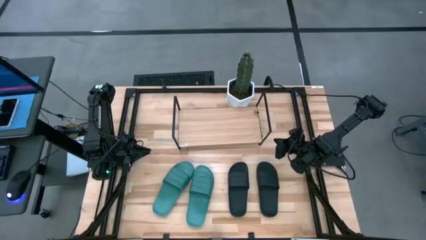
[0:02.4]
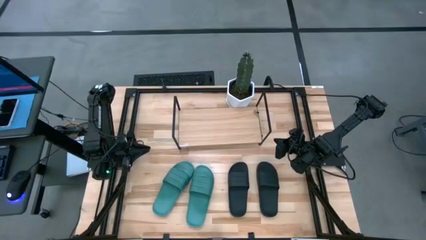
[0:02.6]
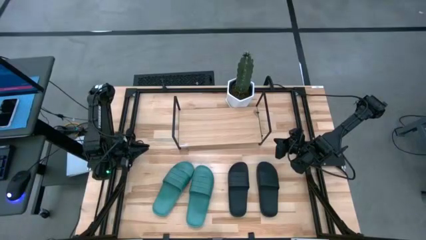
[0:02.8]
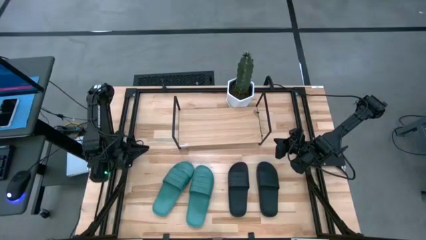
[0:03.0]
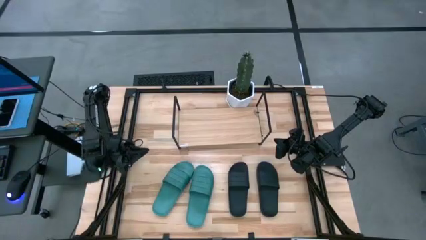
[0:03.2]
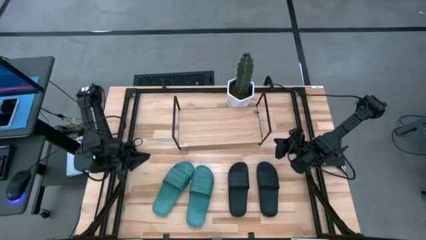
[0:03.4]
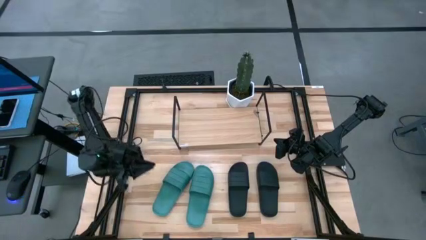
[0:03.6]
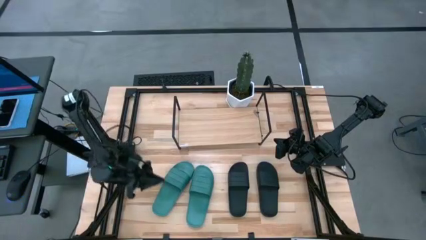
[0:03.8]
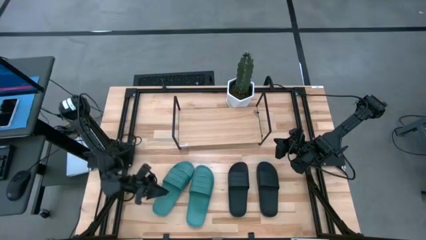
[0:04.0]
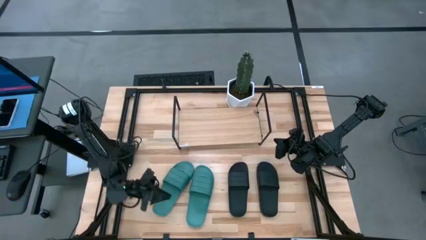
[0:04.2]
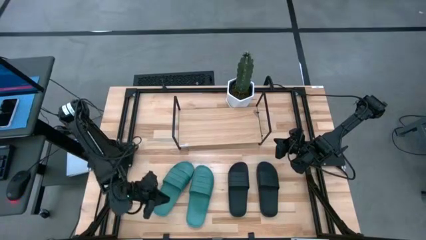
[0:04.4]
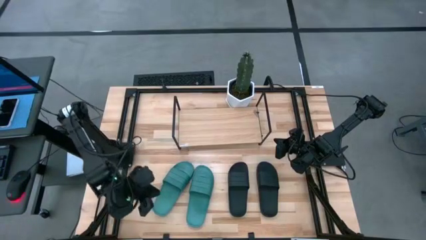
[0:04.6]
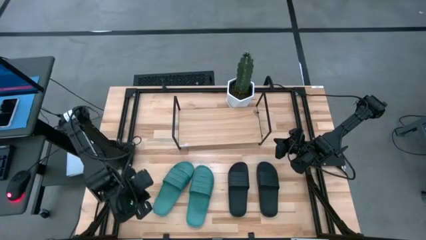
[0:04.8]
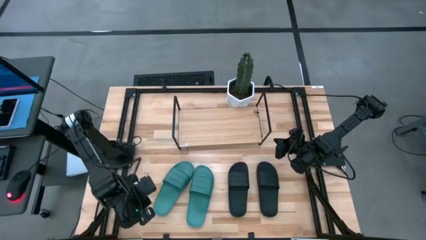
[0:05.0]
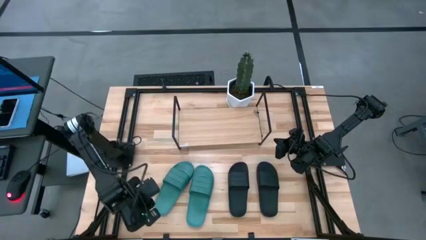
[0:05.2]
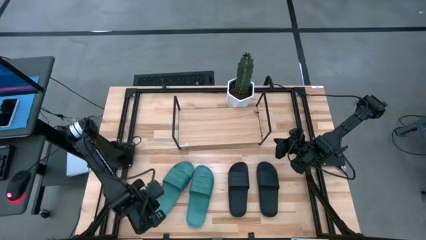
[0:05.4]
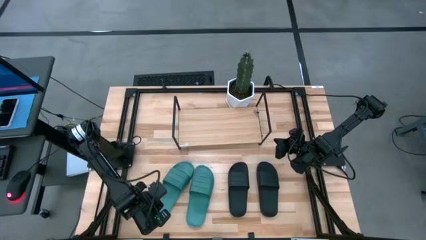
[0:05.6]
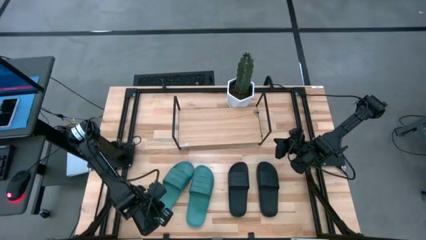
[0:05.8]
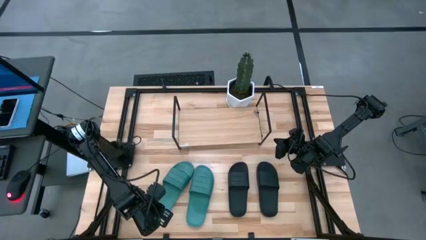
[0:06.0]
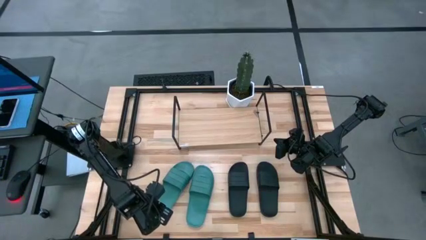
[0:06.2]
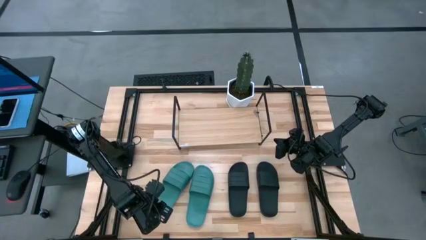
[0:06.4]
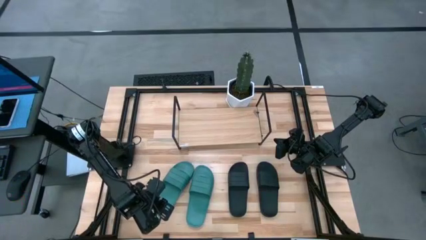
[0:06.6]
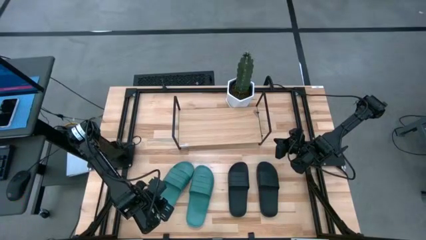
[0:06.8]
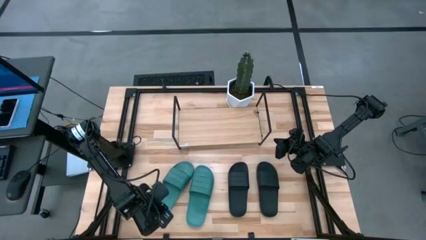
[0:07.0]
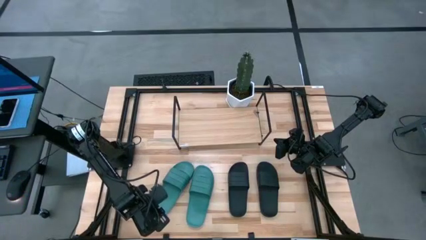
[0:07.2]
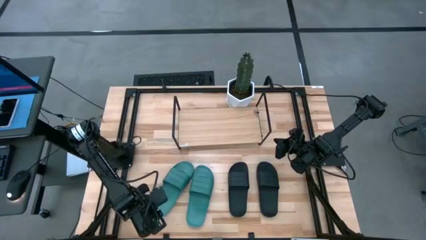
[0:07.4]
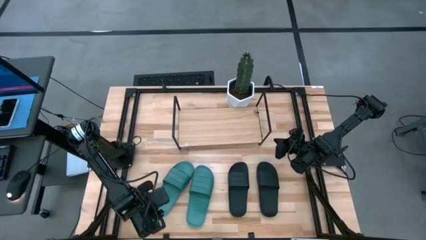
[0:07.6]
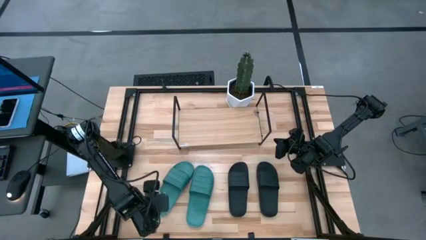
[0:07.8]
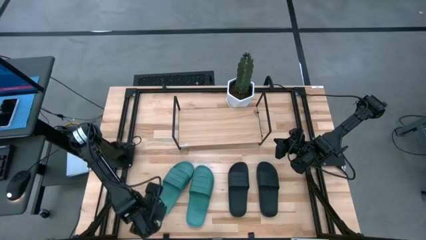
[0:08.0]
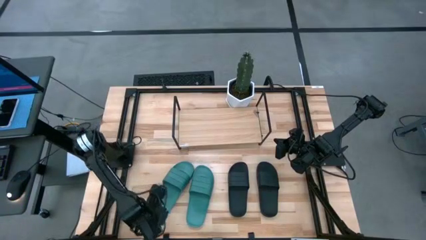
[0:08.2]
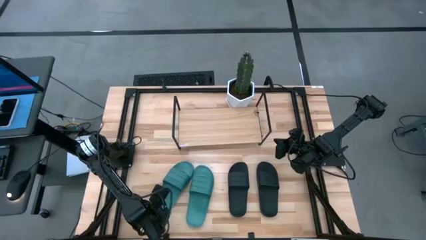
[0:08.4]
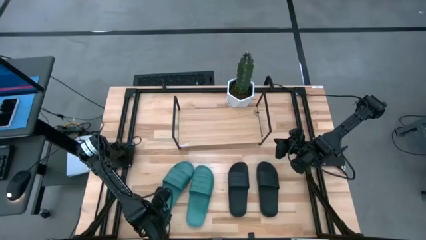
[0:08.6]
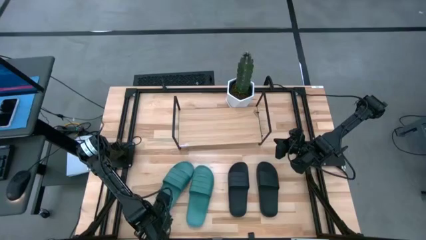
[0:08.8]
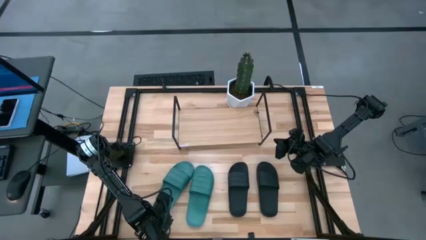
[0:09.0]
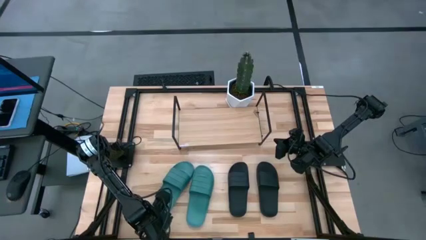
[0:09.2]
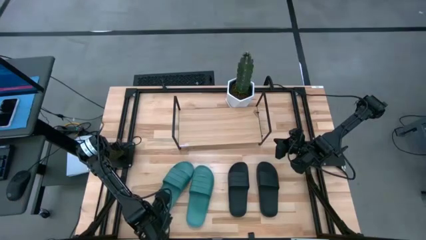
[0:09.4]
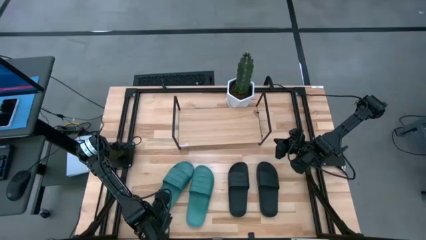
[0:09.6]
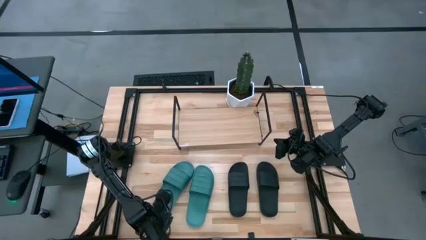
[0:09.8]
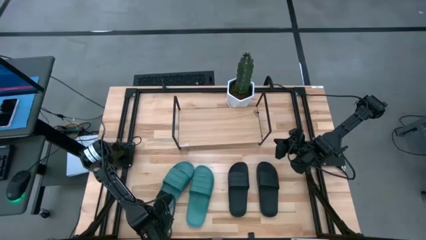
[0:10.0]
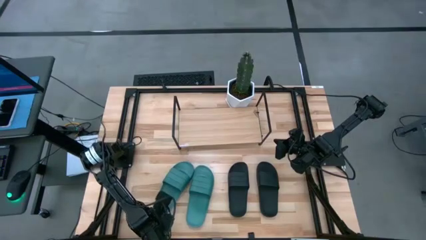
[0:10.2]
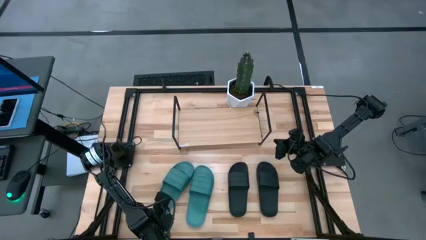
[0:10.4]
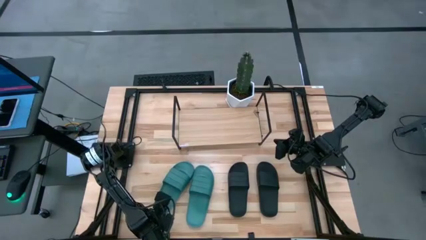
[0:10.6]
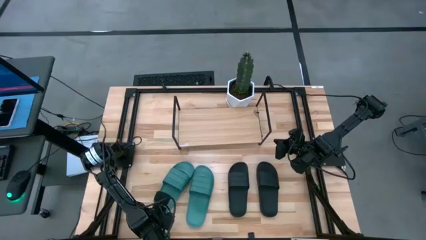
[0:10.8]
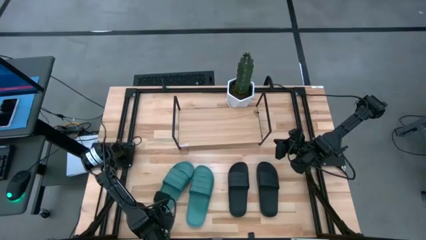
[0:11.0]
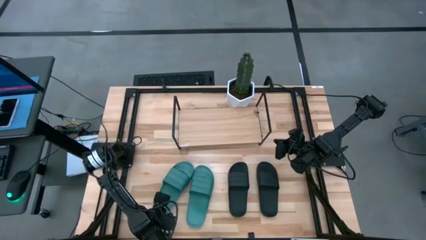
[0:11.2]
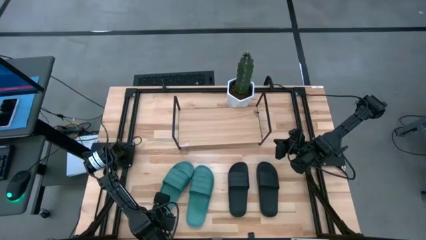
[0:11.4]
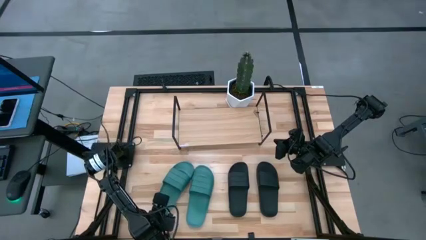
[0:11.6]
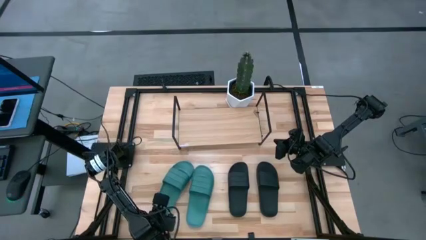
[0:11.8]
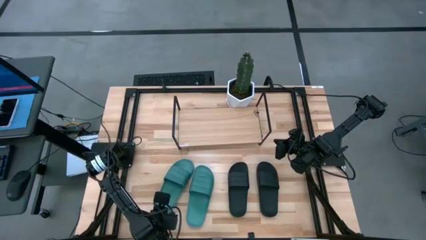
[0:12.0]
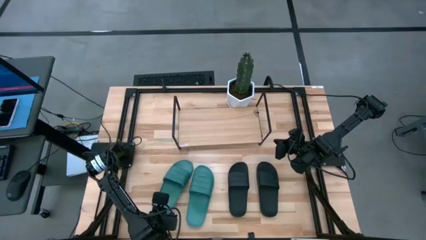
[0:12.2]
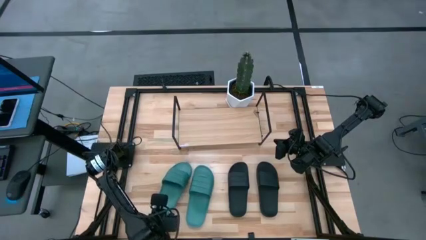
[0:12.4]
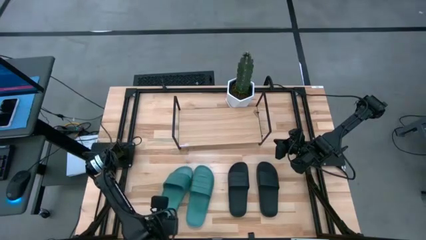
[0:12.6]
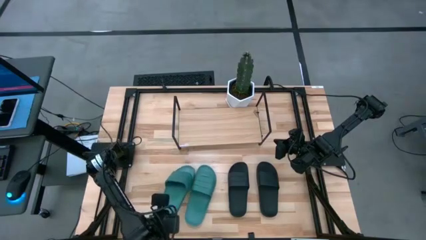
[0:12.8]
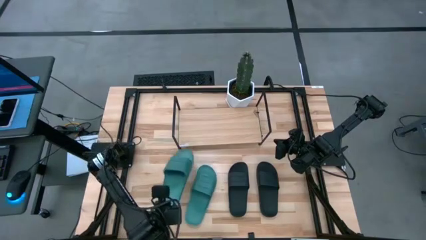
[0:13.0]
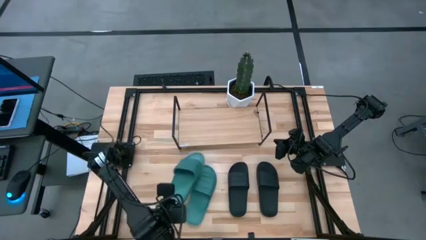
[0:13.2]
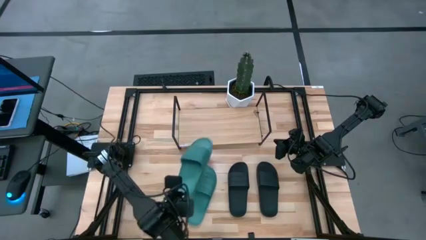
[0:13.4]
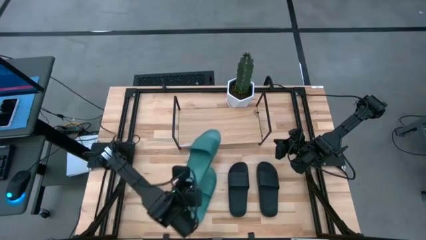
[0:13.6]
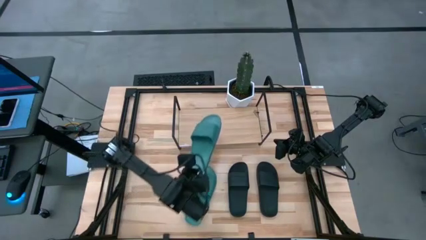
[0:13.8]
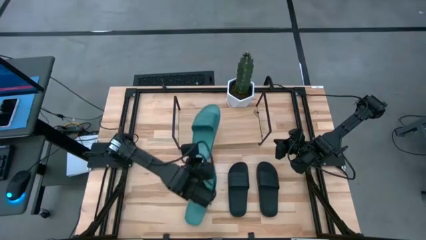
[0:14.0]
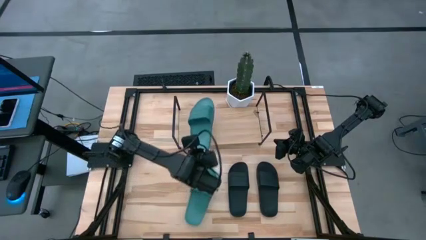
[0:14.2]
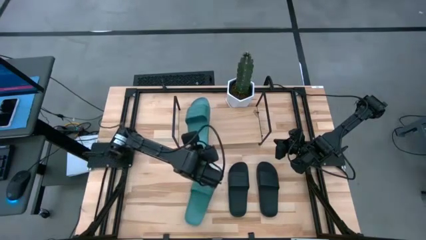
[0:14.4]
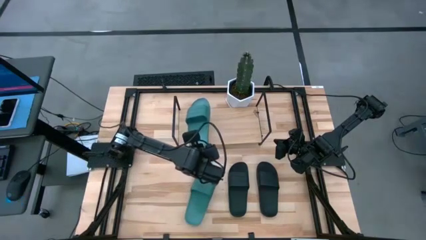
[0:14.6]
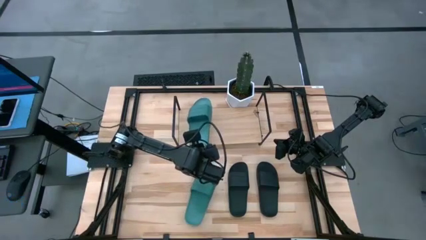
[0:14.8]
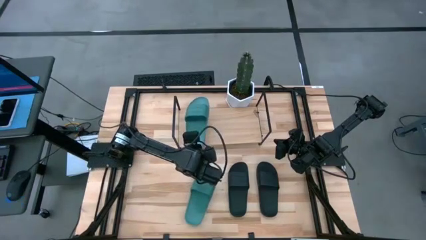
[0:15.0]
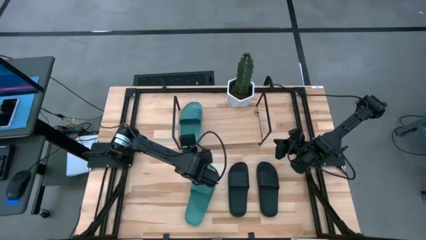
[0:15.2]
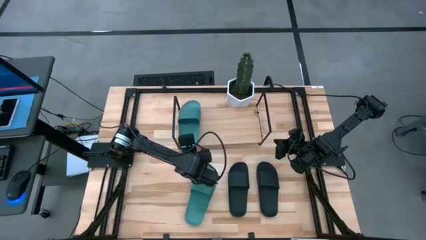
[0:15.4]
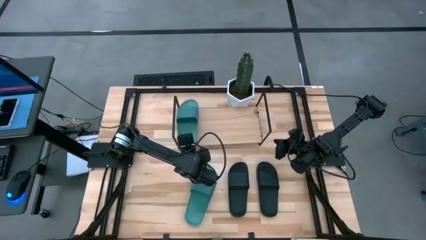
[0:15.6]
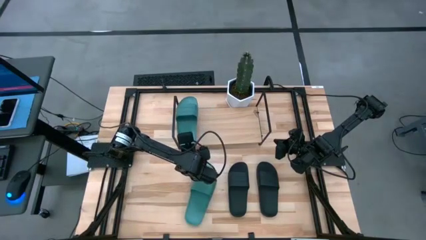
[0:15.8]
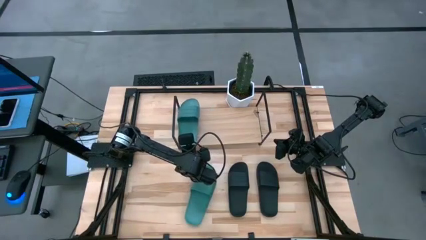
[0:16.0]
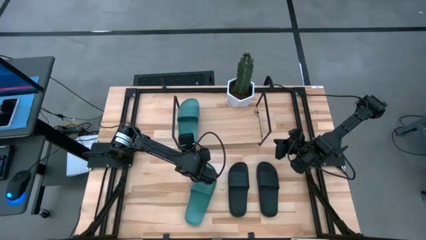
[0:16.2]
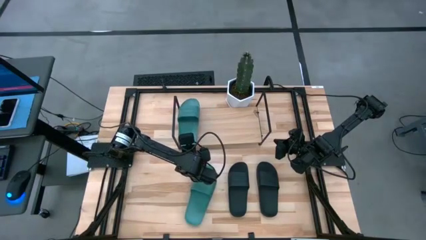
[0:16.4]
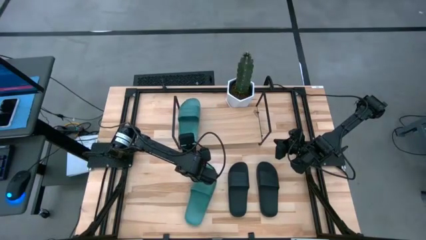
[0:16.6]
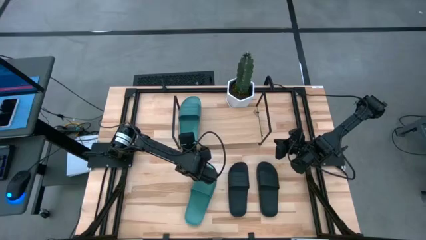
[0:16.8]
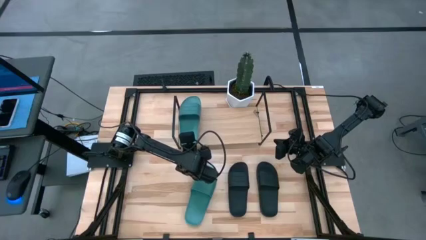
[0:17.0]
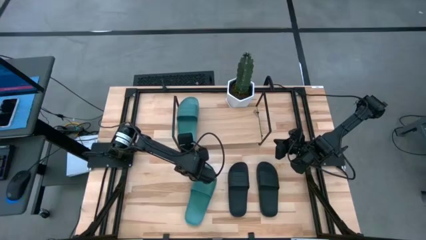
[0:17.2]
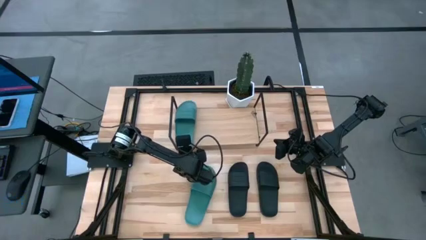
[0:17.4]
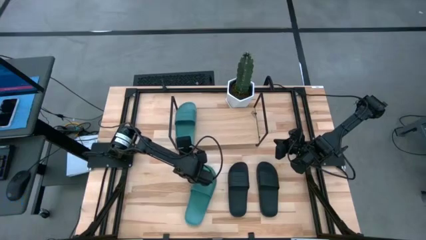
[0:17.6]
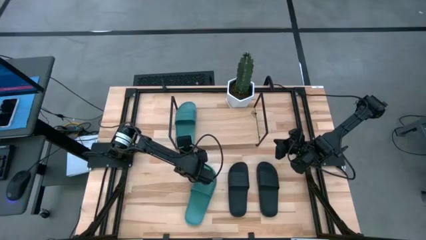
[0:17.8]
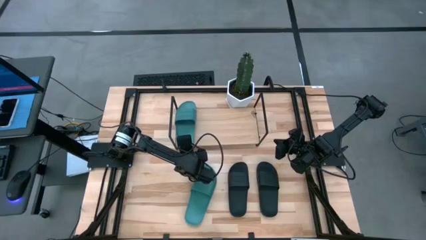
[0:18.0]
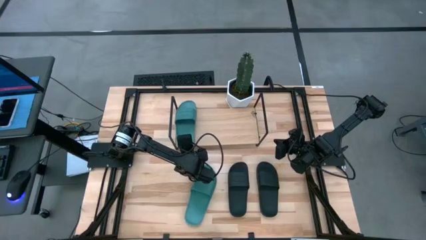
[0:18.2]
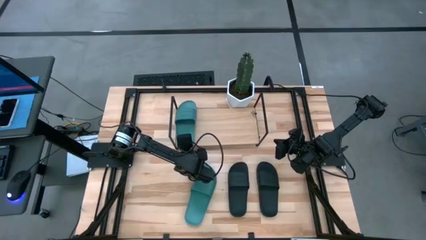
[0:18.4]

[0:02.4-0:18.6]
Task: Pick and place slides into the shelf
Put the left light blue slipper on the shelf
